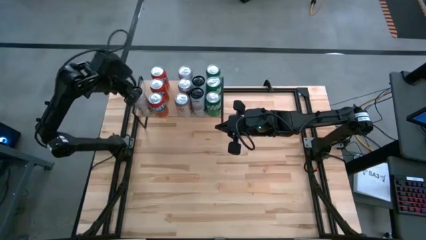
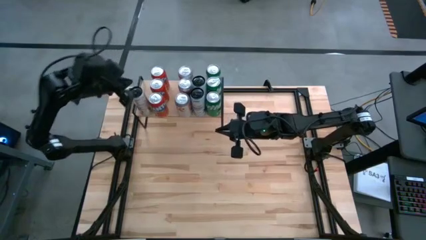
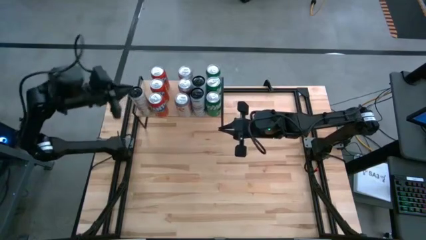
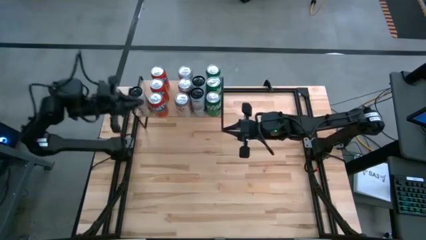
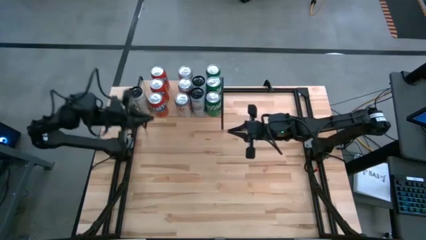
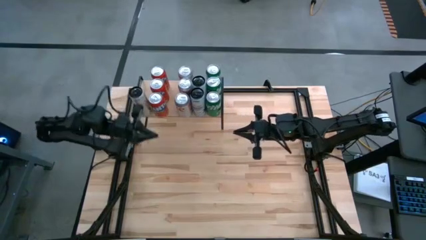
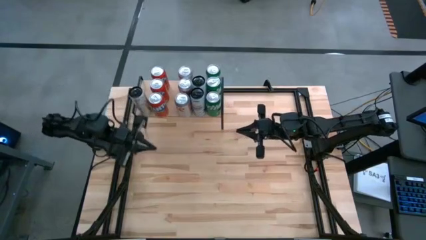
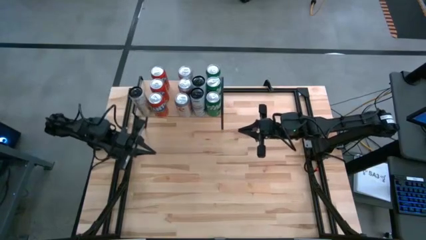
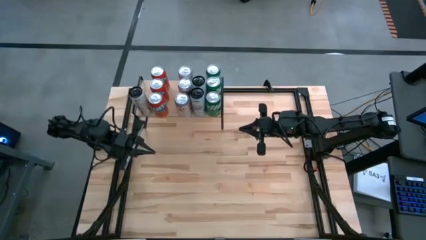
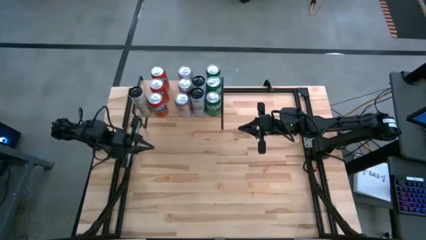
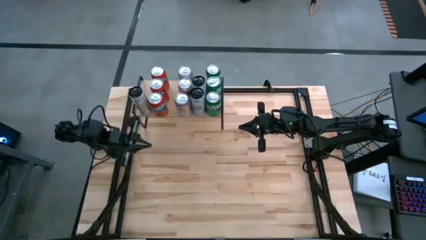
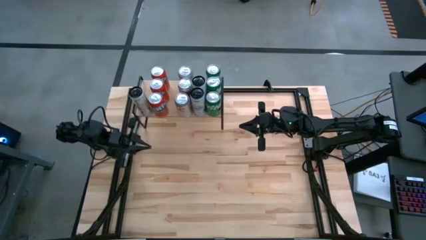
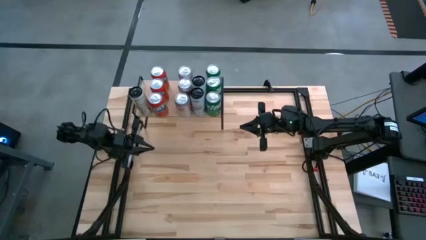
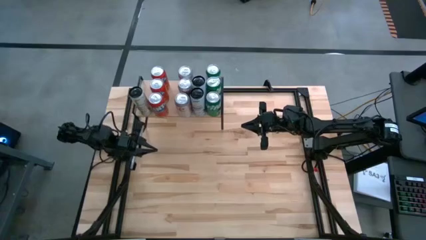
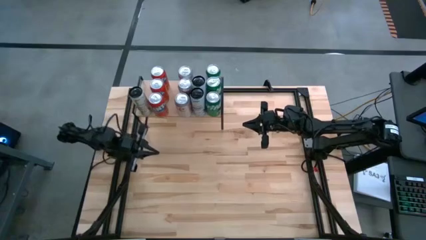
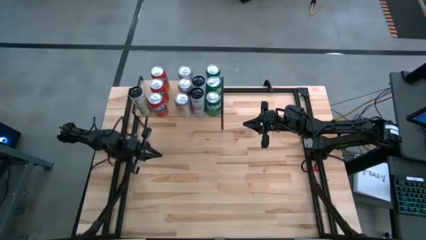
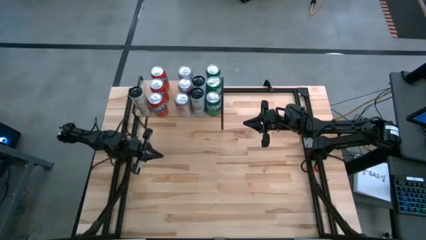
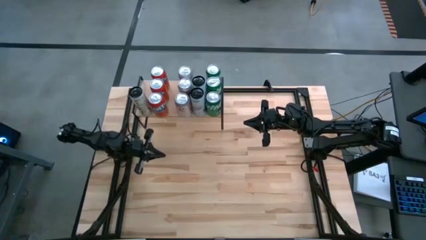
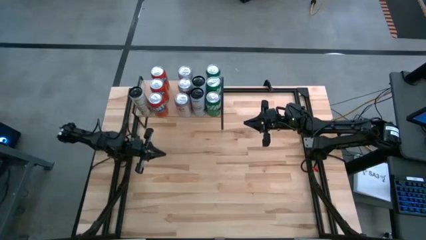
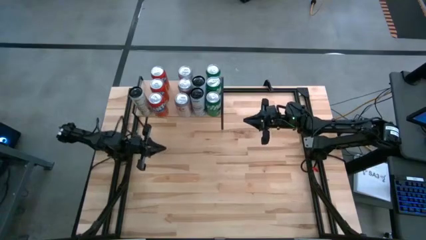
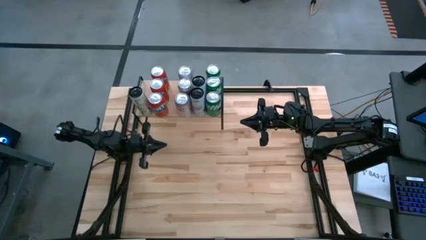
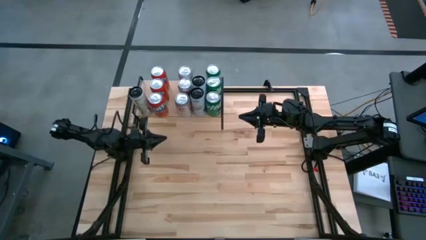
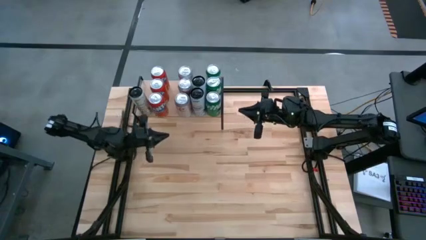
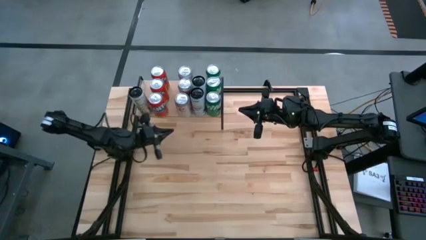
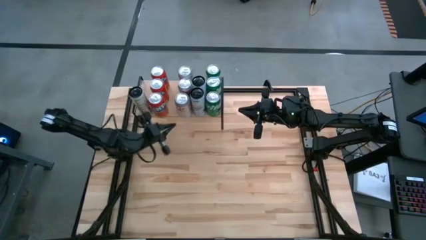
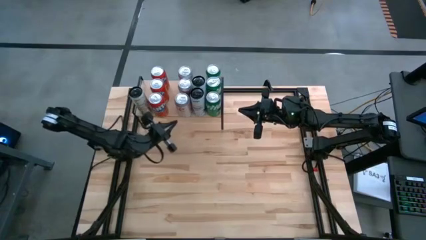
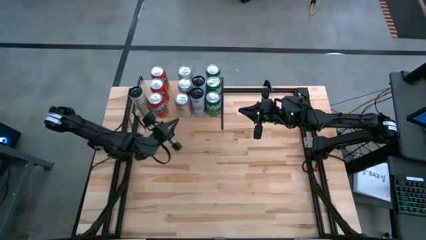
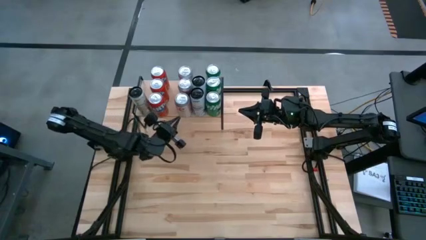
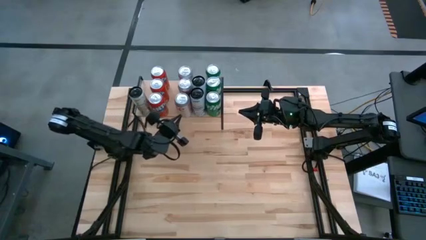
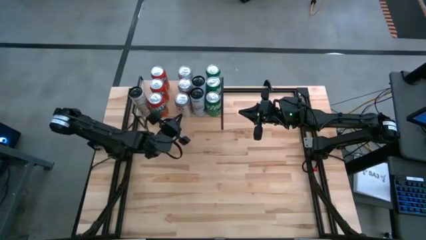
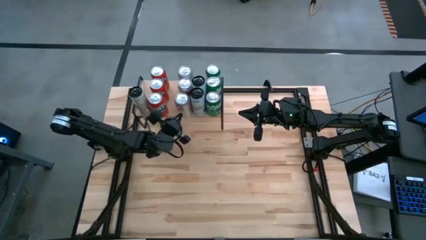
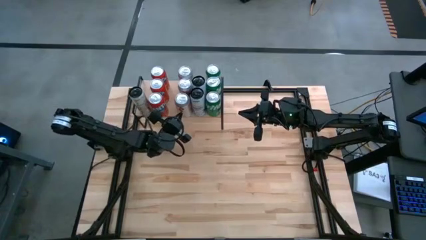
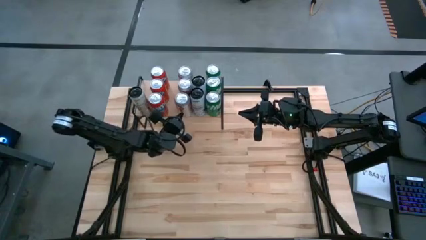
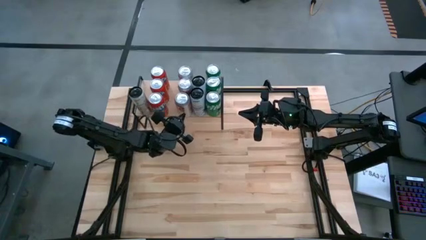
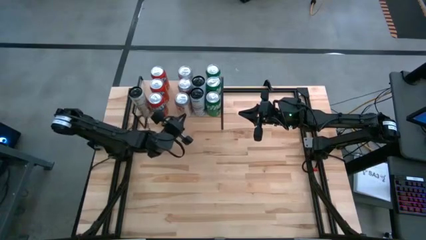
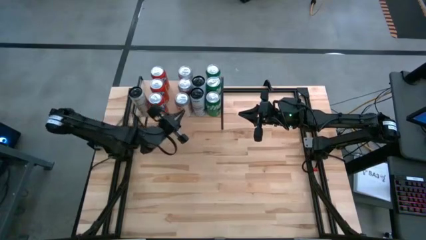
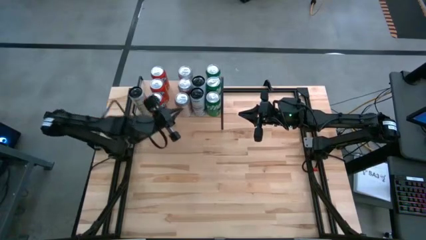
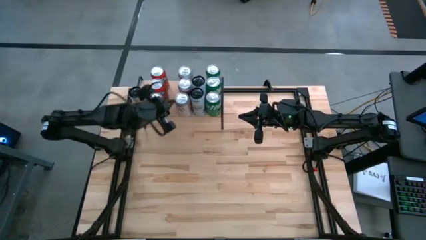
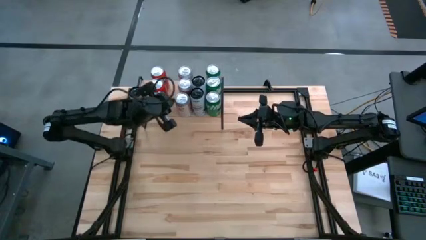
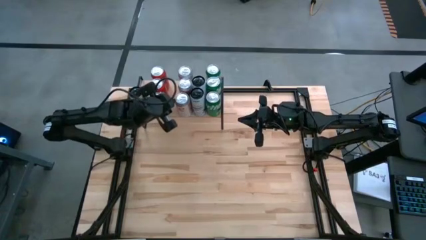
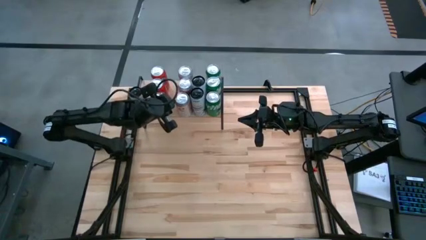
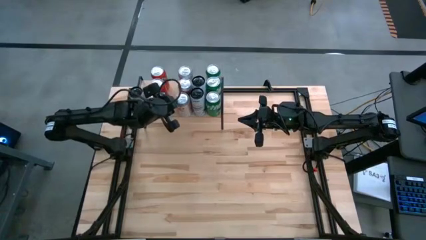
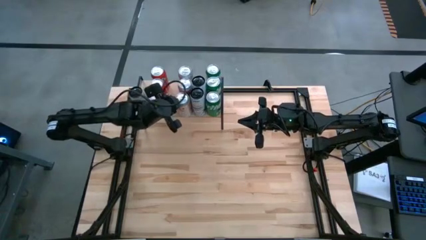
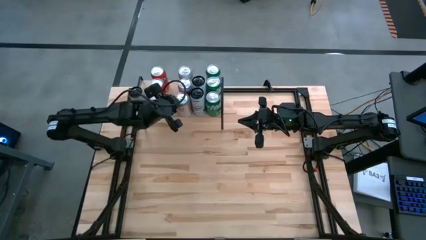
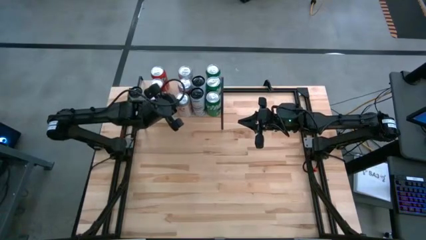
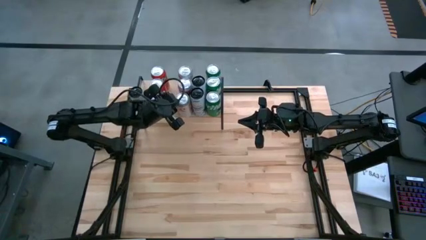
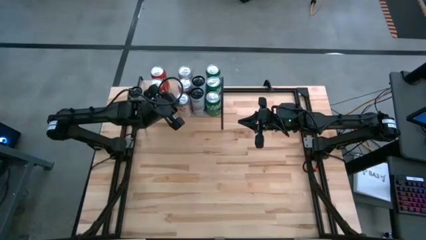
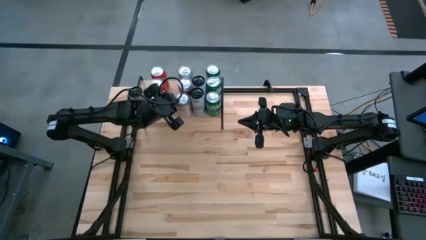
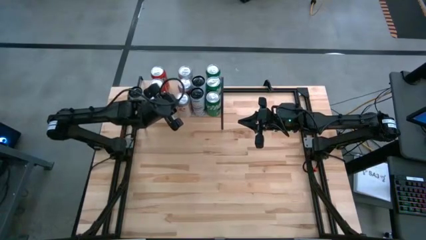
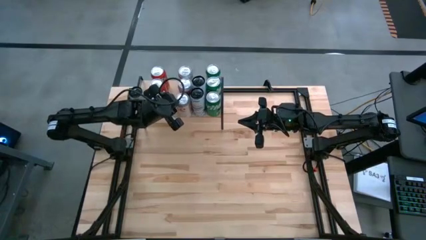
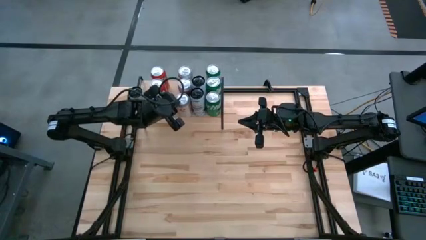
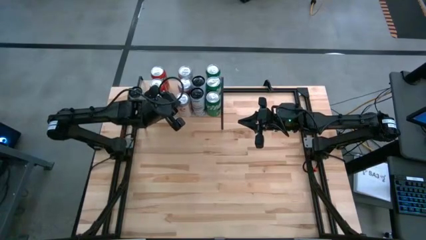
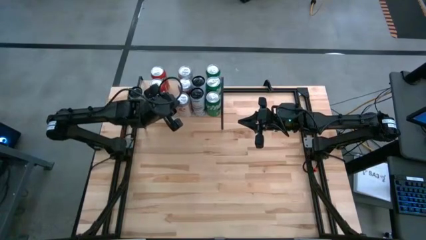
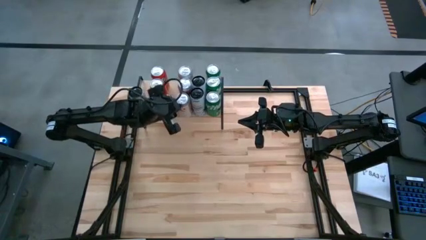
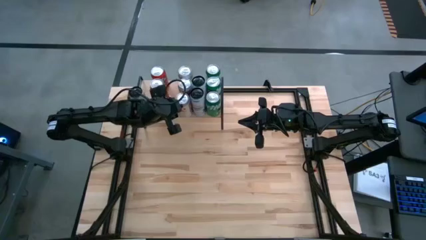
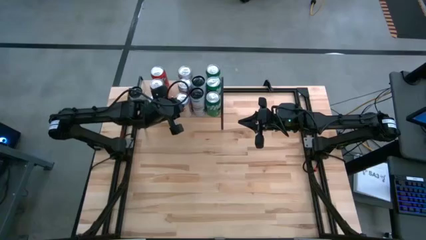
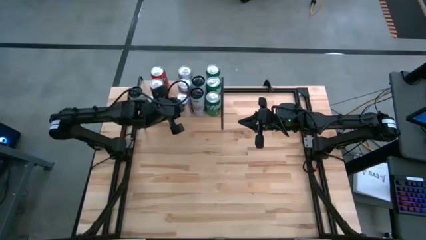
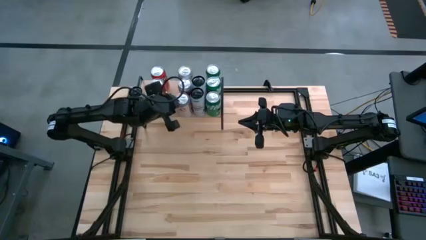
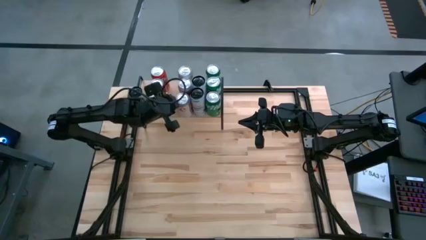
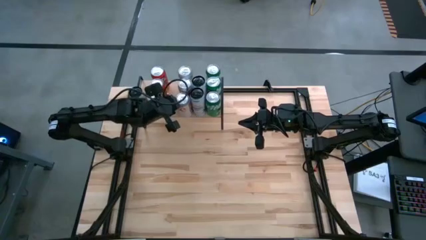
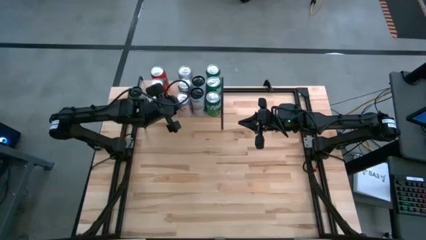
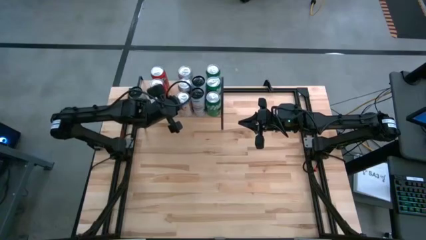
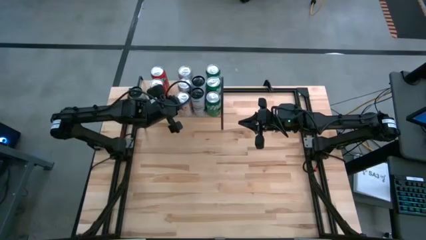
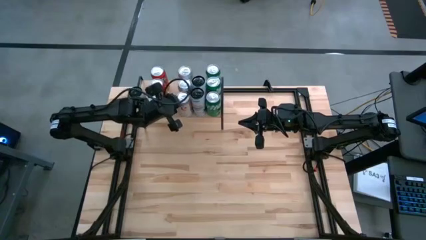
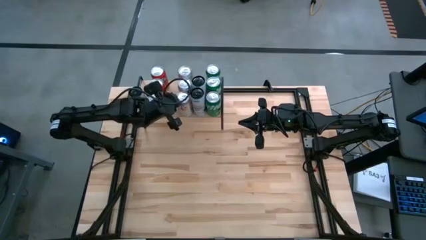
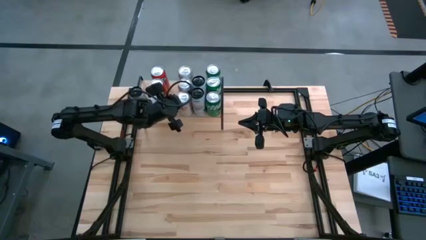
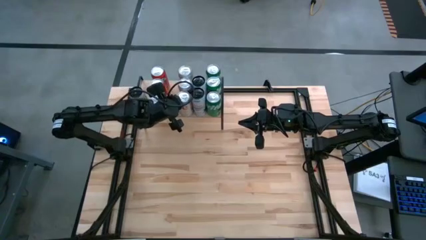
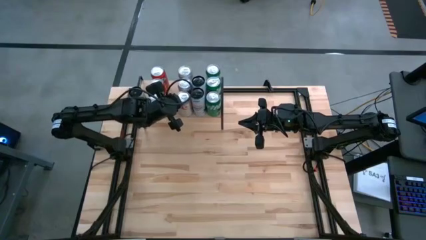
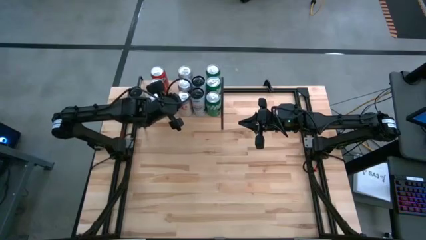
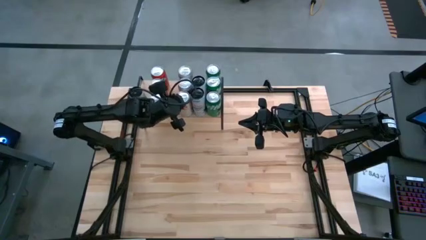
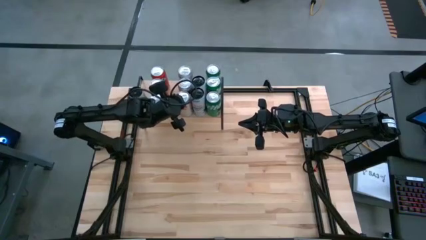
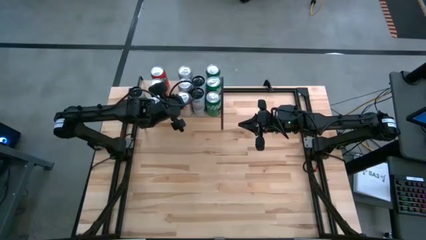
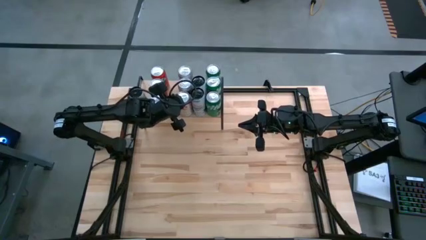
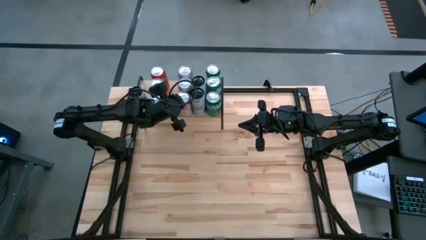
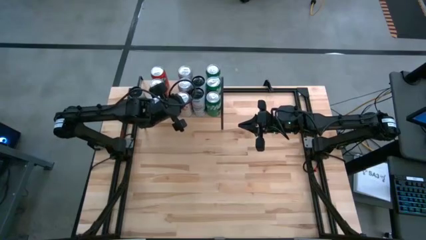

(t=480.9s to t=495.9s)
Task: Place canned beverage on shelf
Adjust the silver soda can on the shelf
